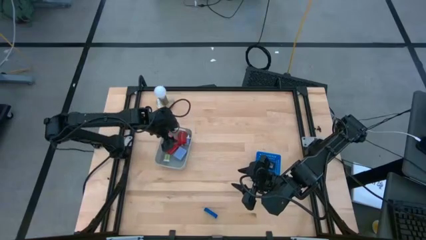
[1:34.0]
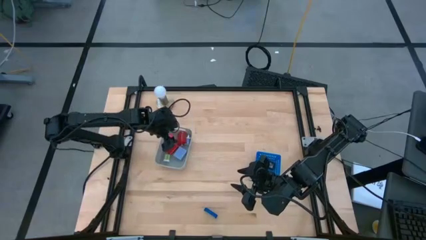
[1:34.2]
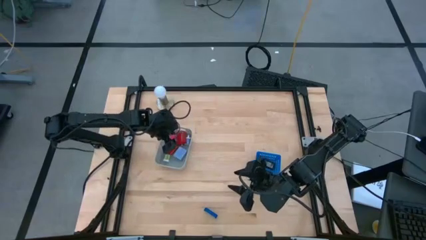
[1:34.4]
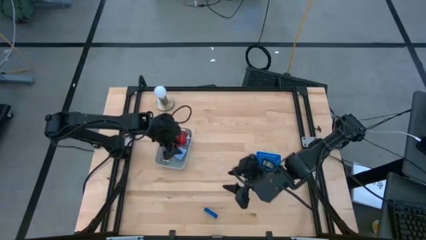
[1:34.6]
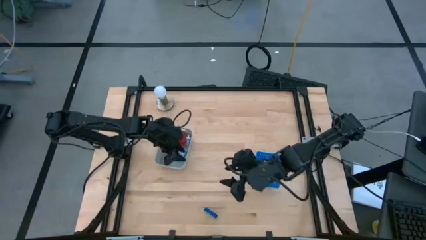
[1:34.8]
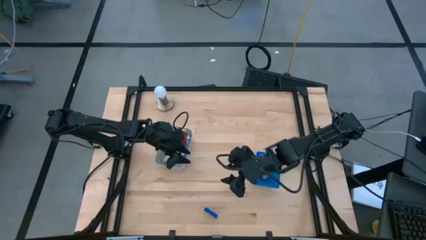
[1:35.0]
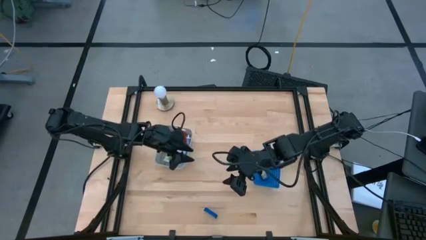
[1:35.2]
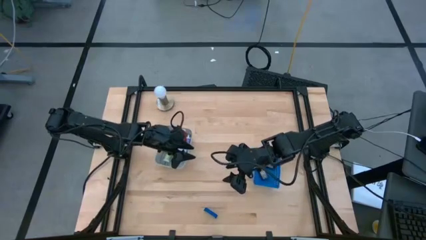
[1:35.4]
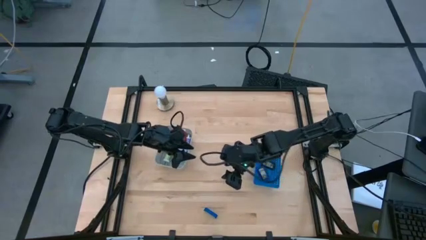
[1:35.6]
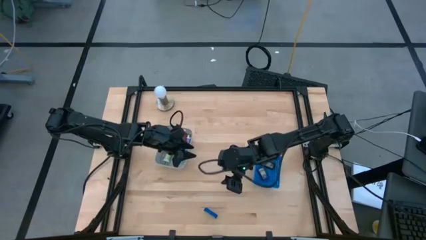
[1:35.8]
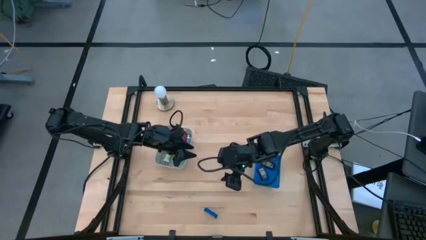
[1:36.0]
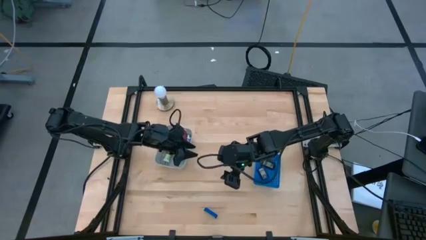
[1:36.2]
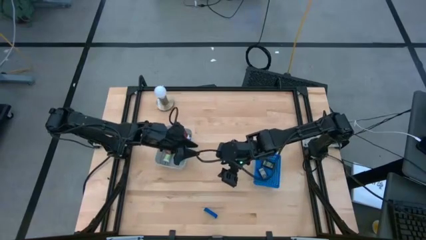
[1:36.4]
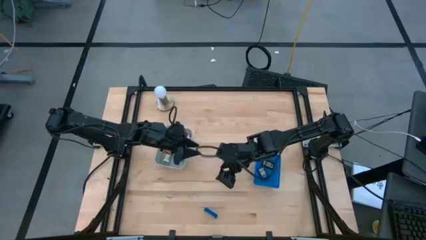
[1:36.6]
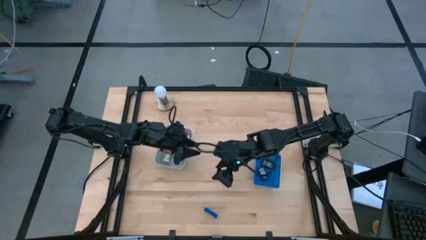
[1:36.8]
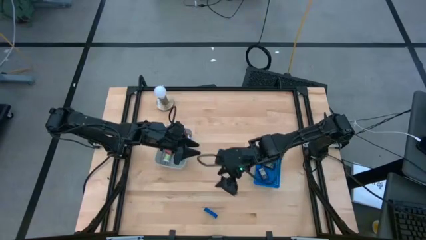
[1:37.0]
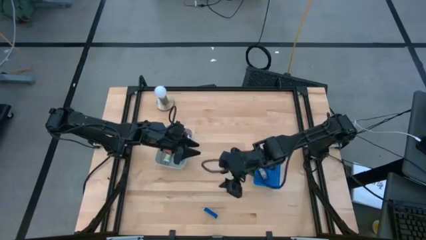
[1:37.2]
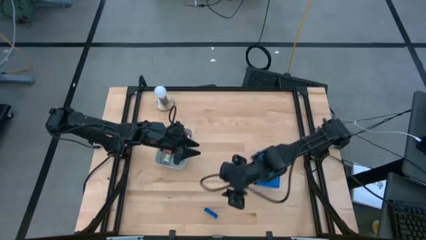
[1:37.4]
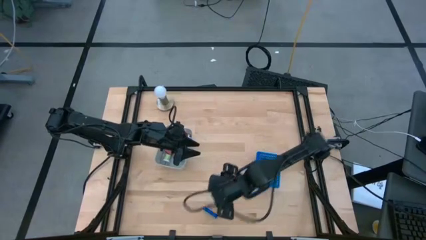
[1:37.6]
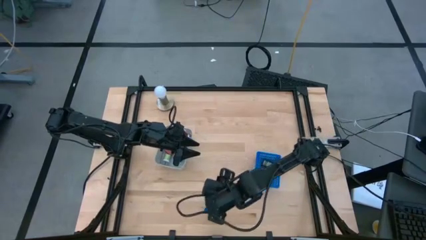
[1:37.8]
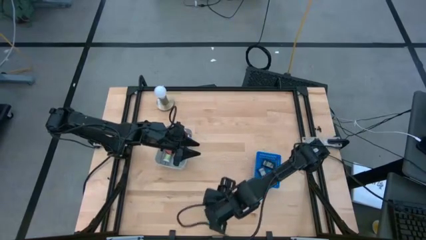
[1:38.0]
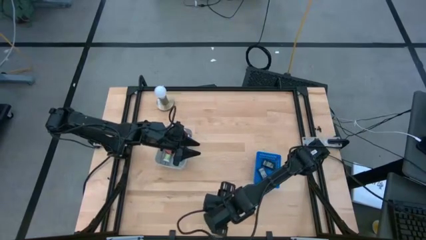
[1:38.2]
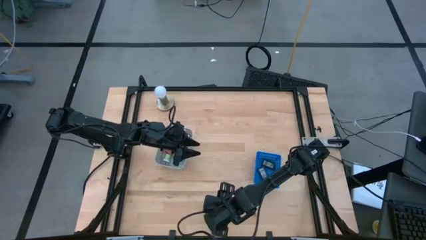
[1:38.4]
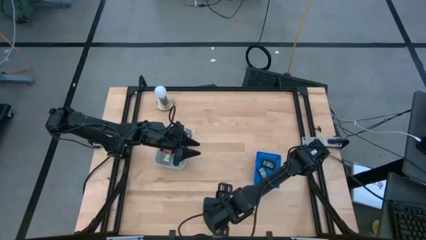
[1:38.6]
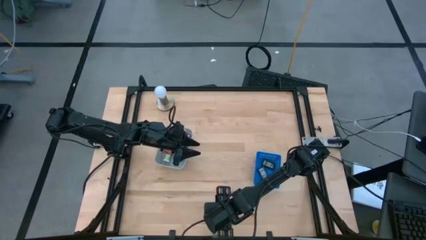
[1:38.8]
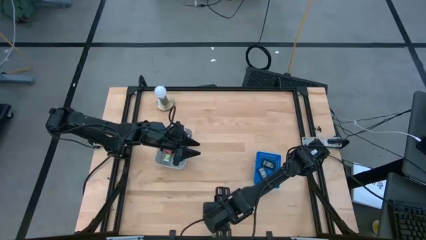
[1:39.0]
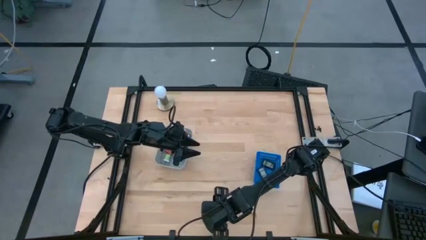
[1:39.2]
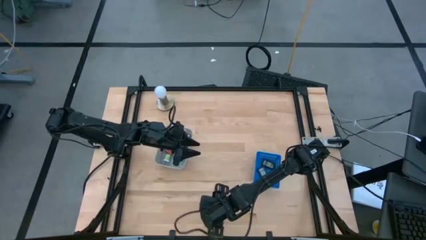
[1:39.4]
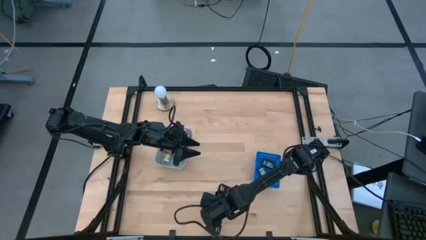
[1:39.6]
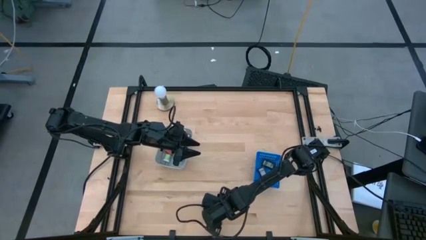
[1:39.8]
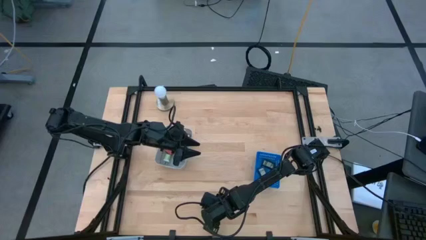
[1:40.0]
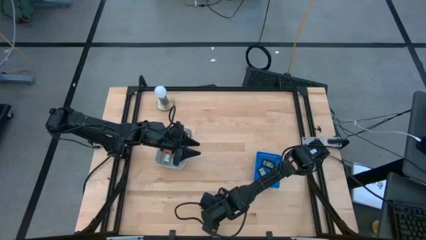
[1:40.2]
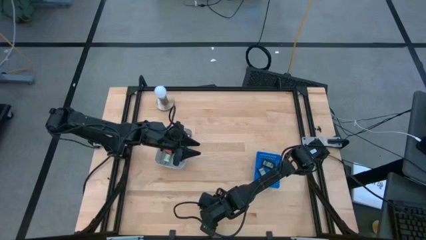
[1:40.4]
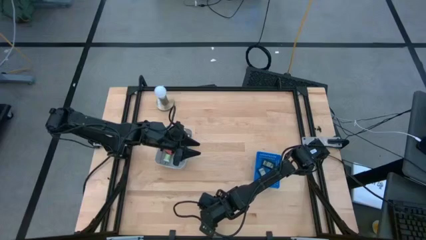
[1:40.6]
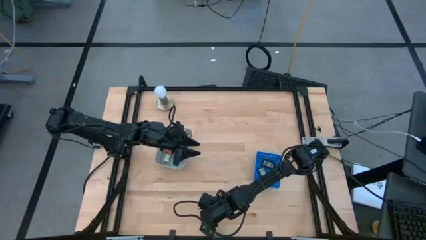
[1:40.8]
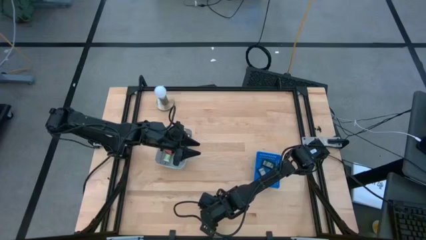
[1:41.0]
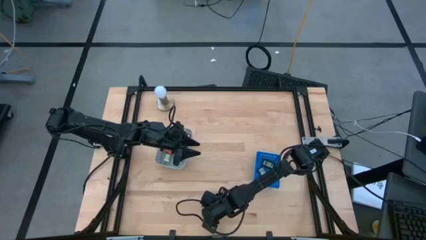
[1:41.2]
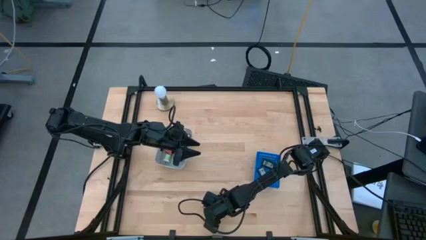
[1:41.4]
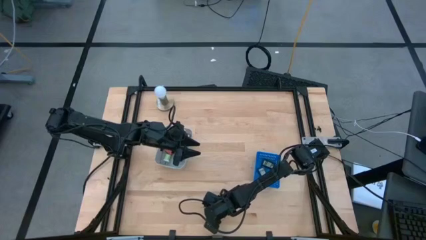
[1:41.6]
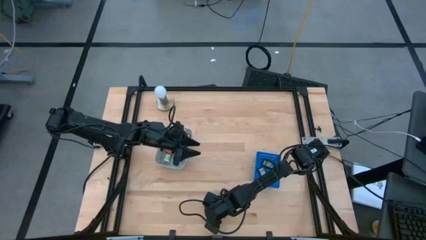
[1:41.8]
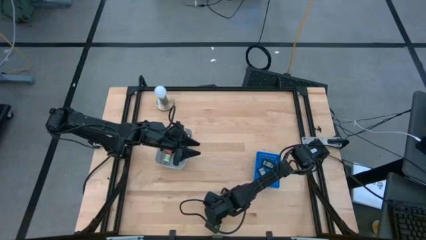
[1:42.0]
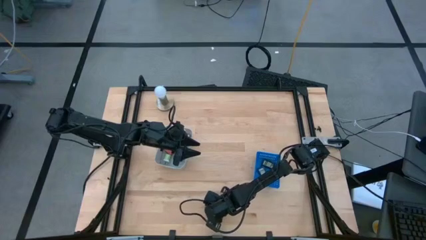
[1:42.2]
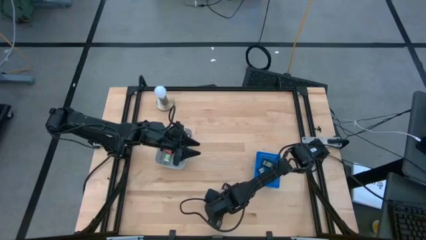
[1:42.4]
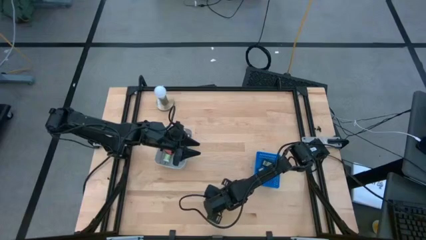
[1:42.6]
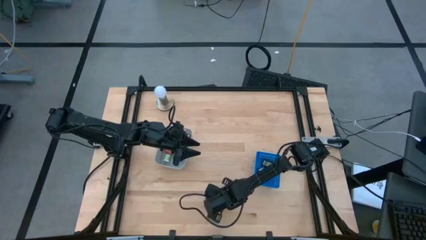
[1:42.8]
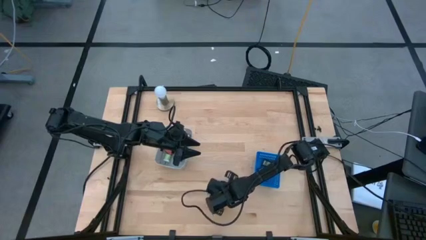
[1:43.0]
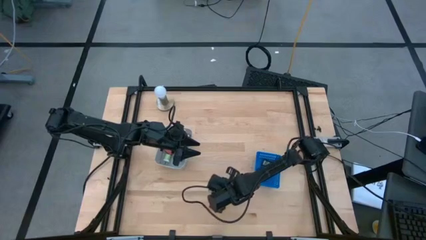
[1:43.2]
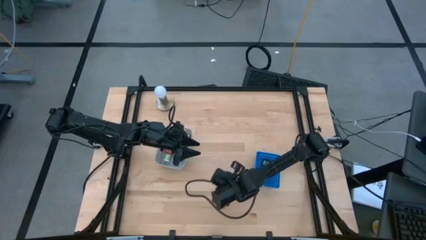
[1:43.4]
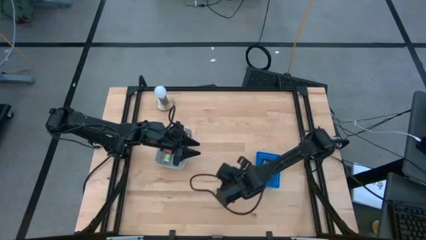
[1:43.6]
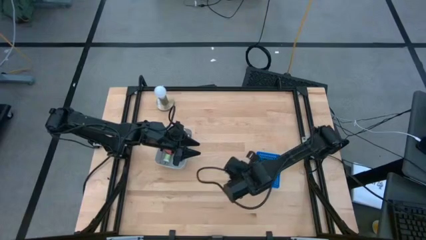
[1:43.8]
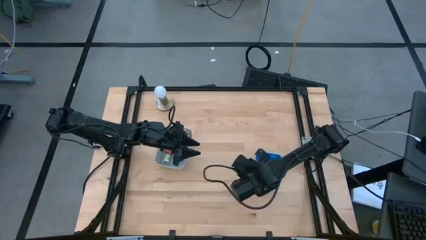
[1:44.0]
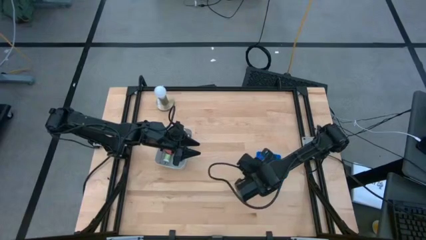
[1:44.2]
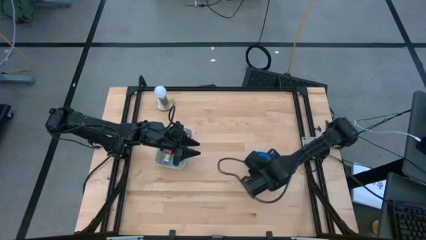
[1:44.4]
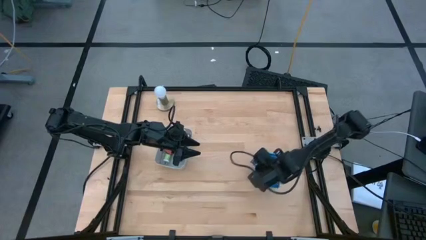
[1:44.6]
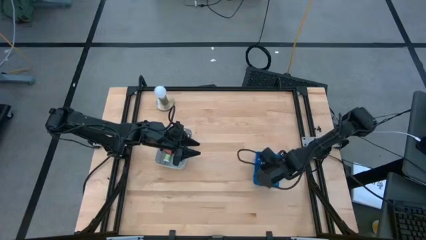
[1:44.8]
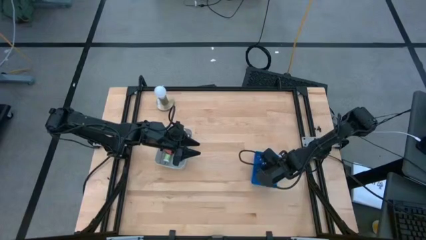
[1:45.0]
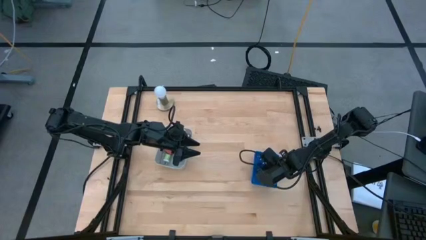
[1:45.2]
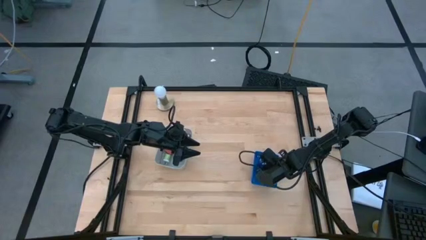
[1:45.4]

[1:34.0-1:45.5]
Task: Pick & Place Office items
Put the blue digital clock into the blue bin

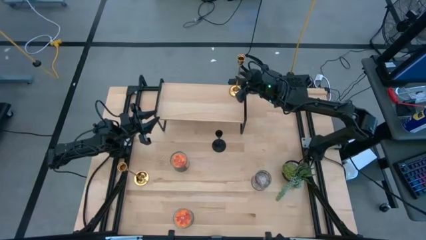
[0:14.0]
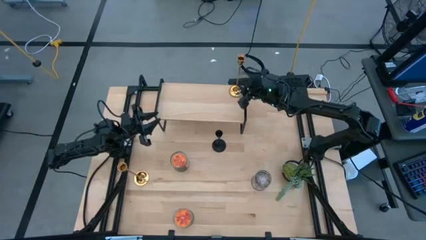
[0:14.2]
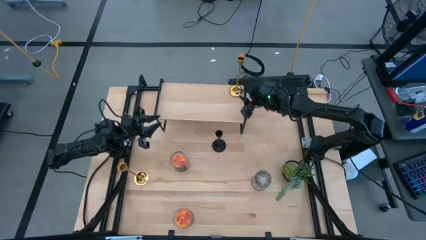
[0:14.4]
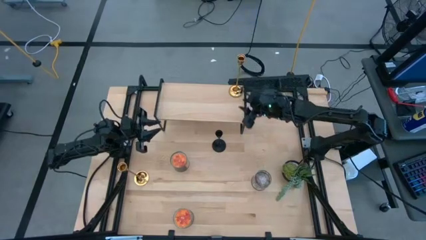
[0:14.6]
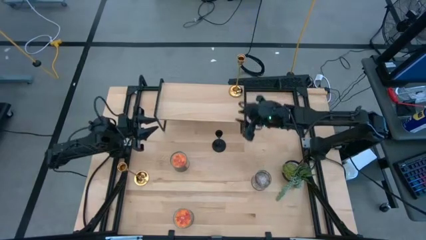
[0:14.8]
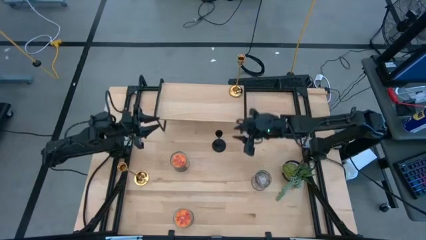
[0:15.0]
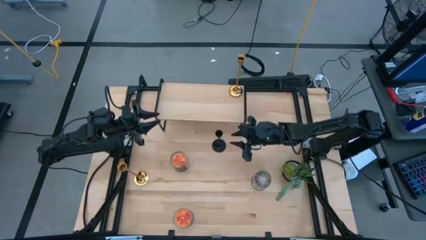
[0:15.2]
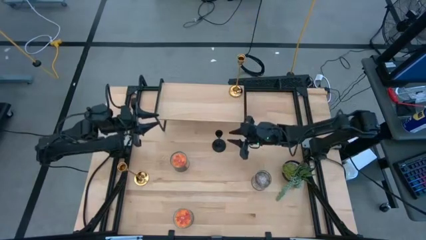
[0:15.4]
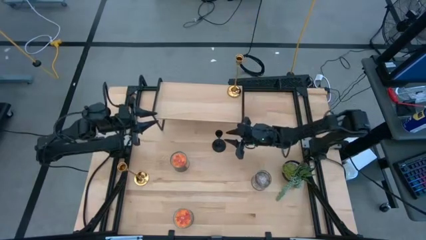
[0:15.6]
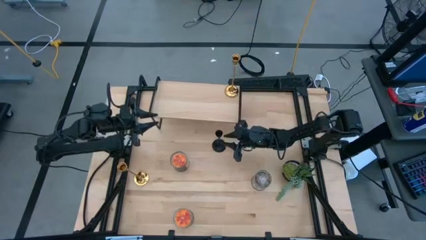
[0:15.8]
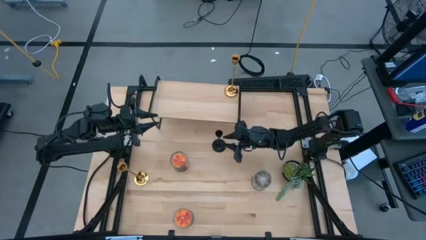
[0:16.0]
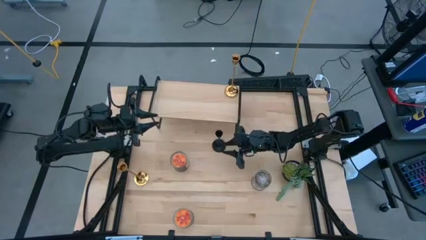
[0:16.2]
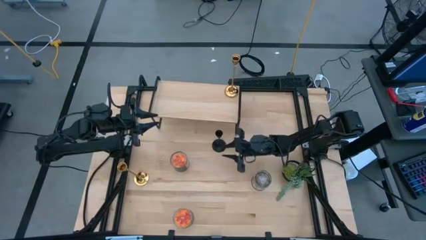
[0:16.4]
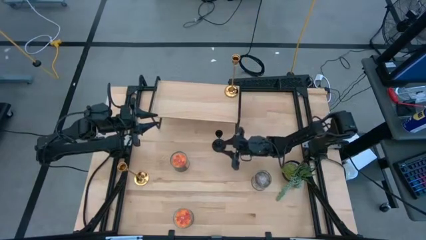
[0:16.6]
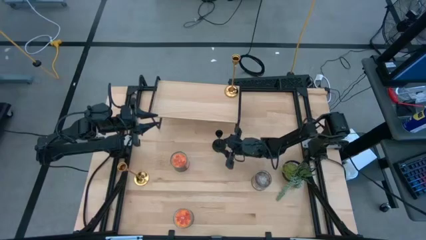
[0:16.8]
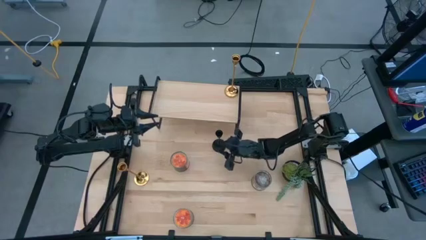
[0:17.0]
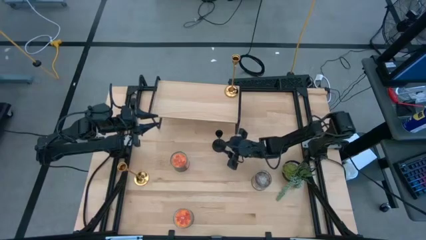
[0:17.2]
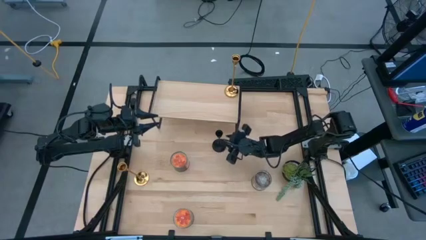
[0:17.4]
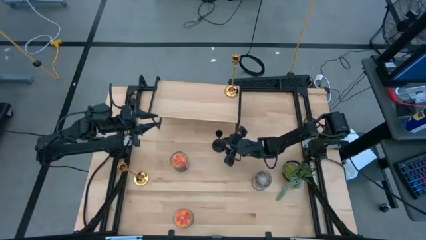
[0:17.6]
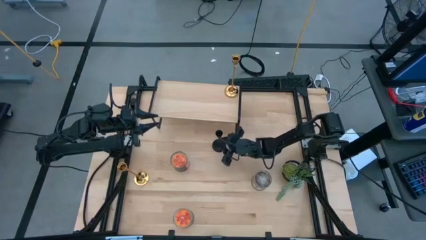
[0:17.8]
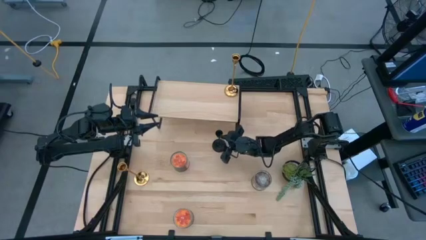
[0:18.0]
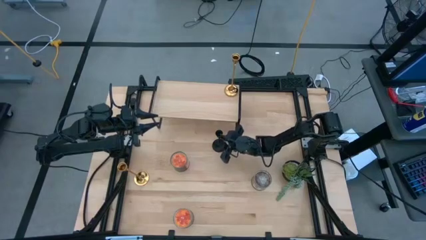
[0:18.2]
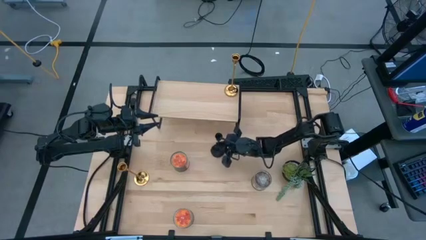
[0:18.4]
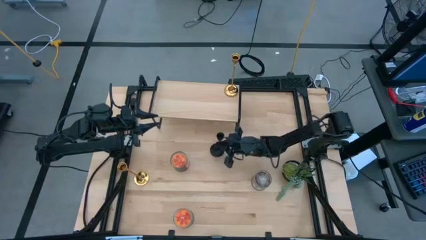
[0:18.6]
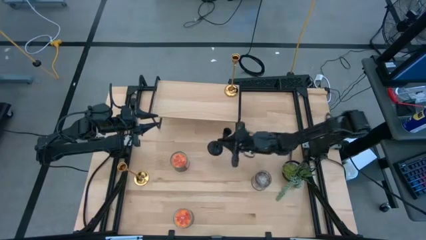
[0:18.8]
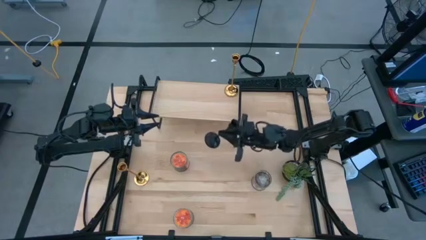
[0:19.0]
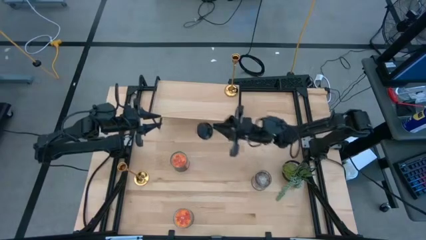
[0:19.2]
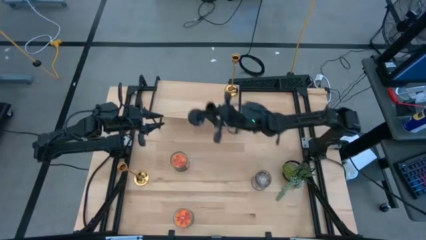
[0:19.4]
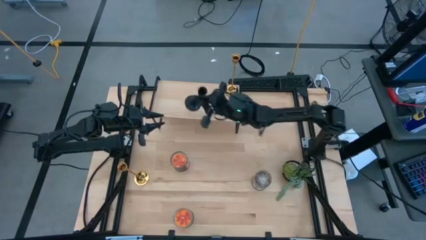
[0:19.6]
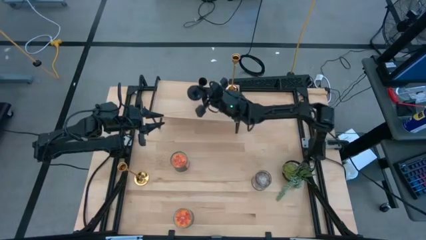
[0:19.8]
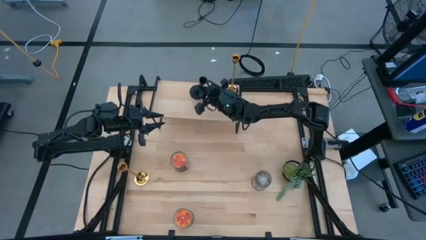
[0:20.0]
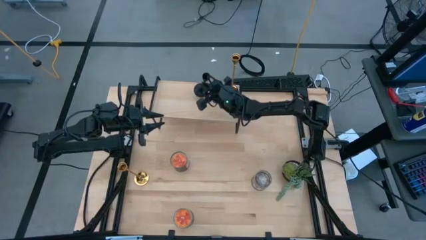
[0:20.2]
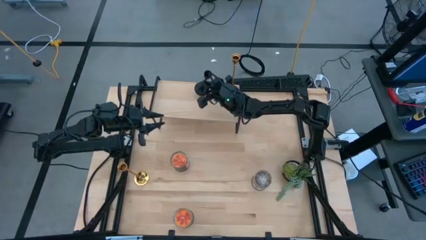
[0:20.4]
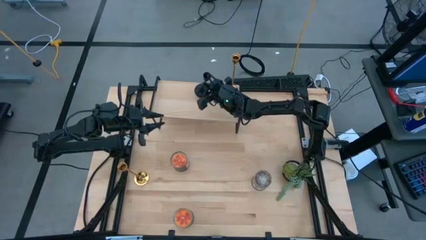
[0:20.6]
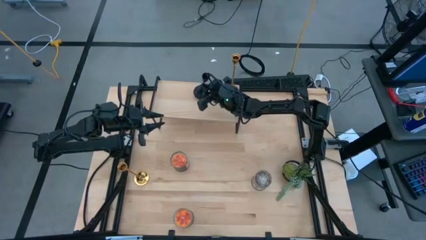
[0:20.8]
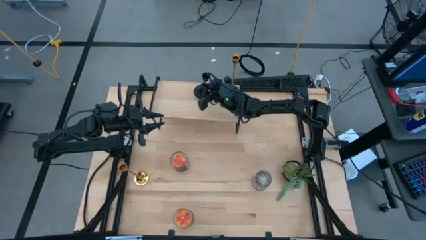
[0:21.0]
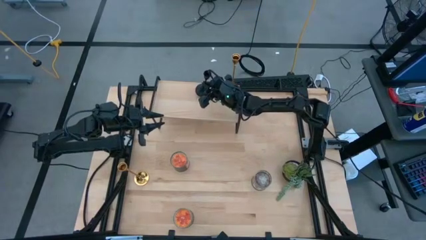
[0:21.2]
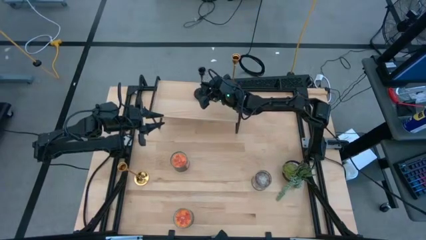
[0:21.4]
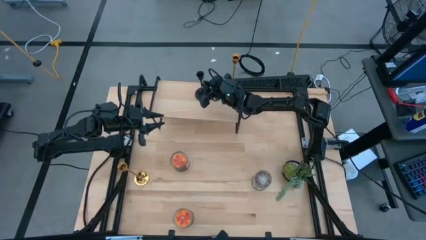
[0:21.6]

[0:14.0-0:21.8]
Task: Pick & Place candle stick holders
Put the black candle holder on the shelf
